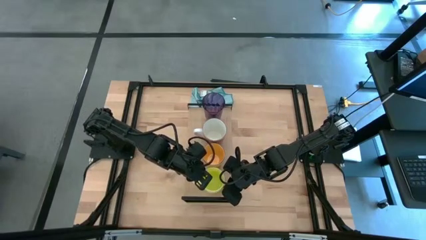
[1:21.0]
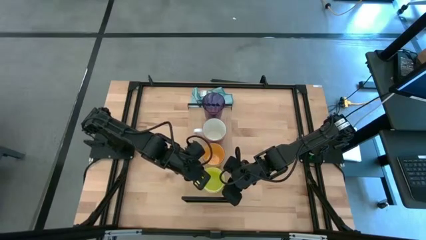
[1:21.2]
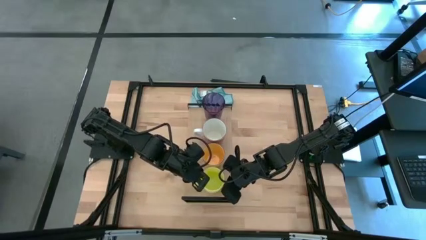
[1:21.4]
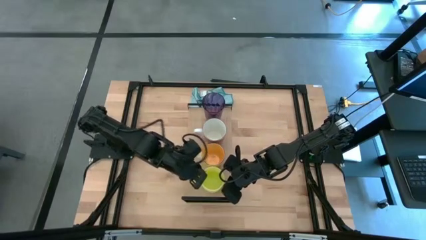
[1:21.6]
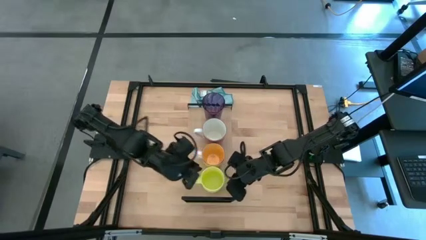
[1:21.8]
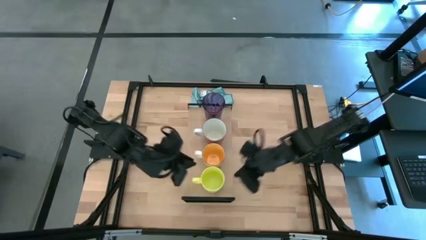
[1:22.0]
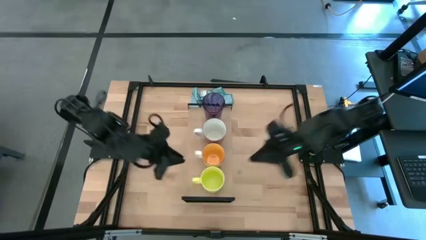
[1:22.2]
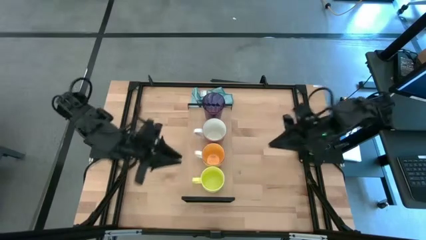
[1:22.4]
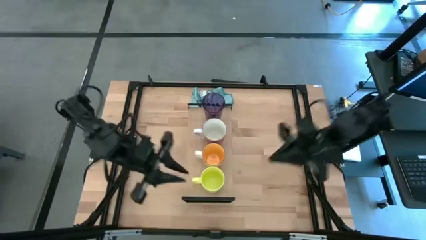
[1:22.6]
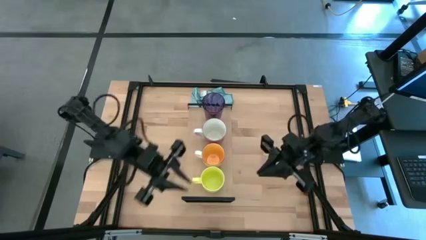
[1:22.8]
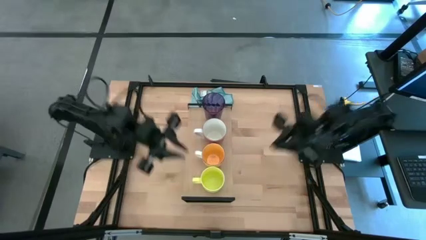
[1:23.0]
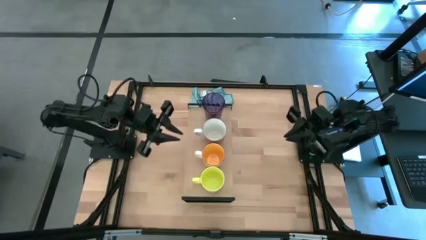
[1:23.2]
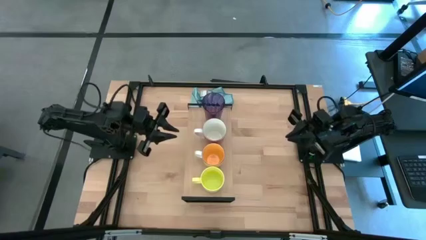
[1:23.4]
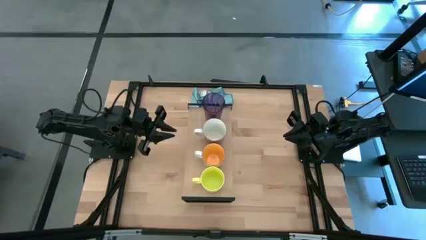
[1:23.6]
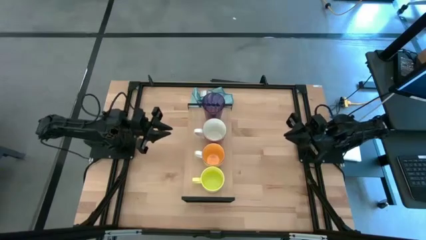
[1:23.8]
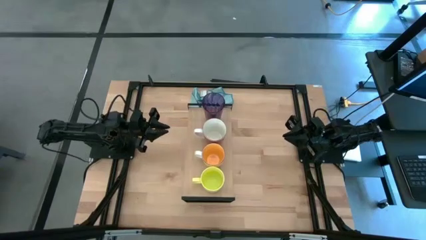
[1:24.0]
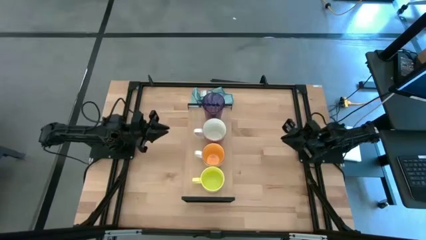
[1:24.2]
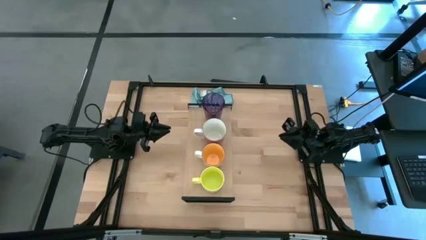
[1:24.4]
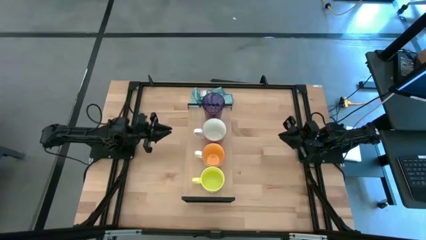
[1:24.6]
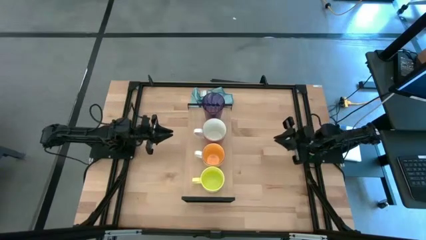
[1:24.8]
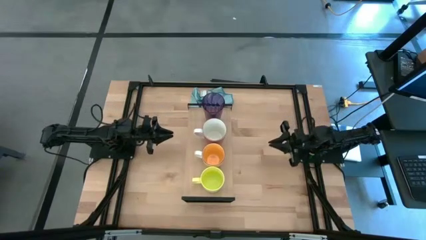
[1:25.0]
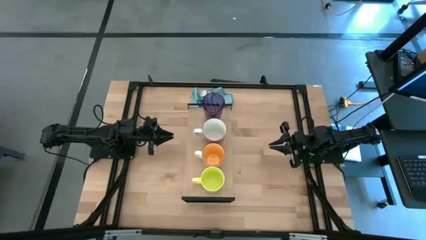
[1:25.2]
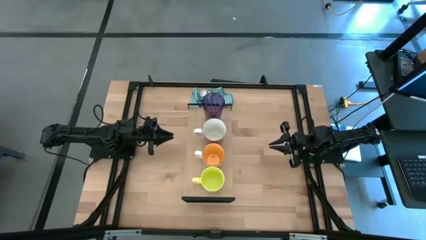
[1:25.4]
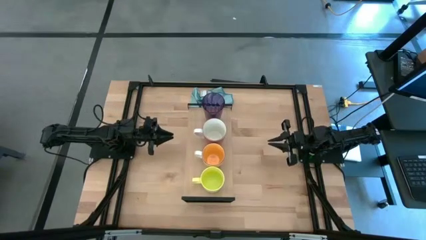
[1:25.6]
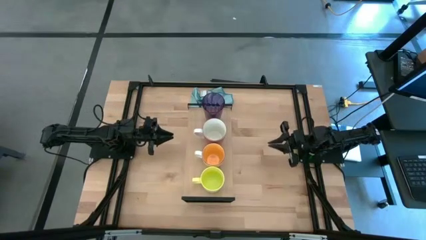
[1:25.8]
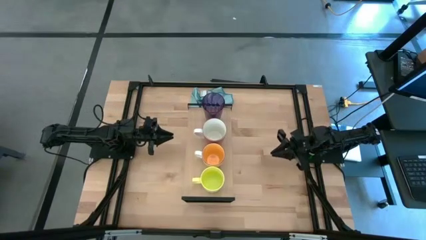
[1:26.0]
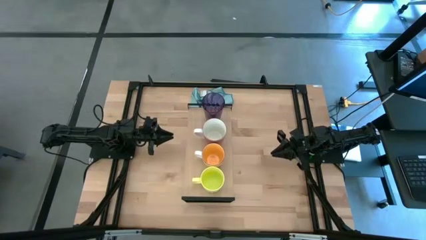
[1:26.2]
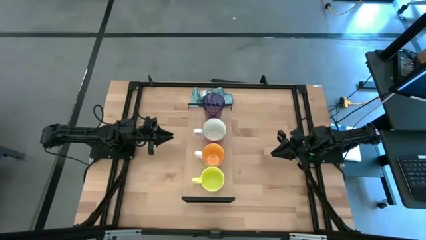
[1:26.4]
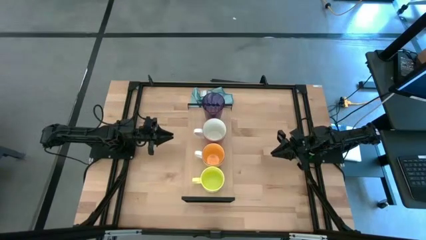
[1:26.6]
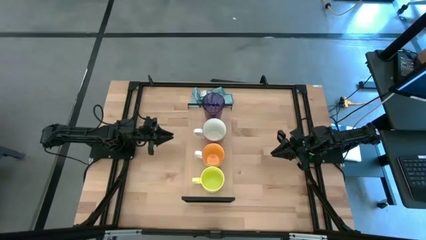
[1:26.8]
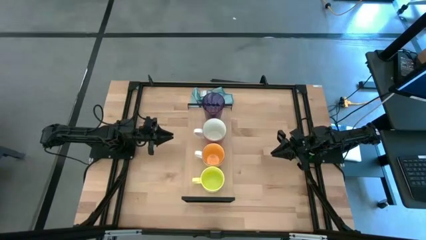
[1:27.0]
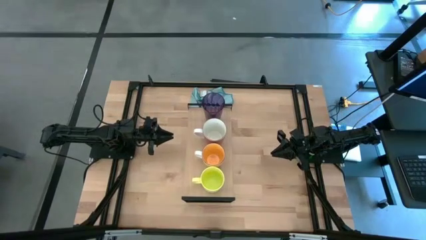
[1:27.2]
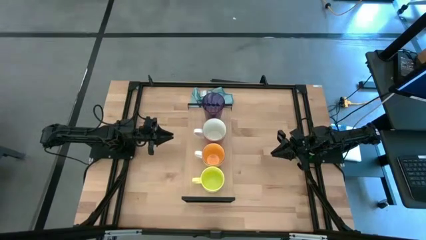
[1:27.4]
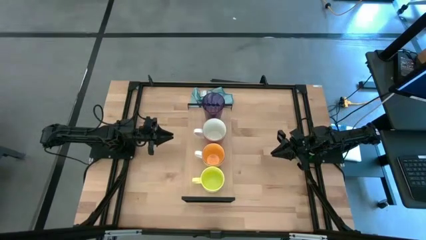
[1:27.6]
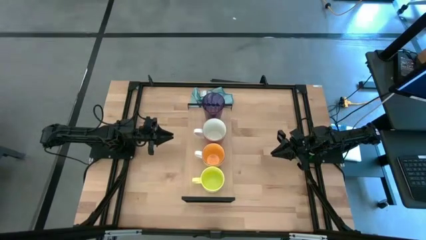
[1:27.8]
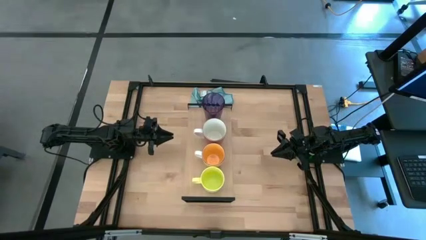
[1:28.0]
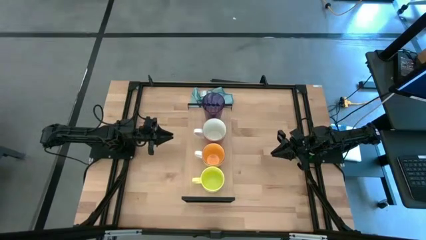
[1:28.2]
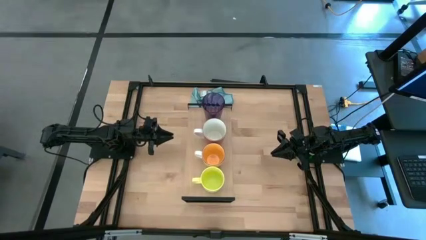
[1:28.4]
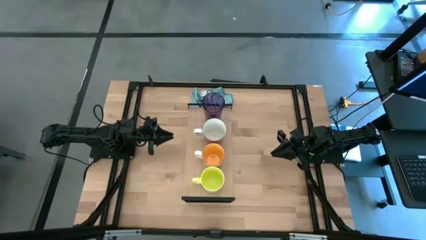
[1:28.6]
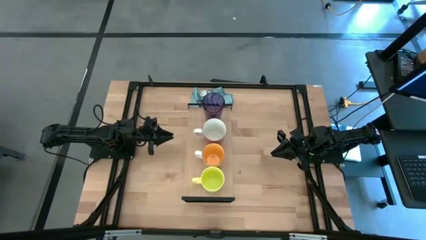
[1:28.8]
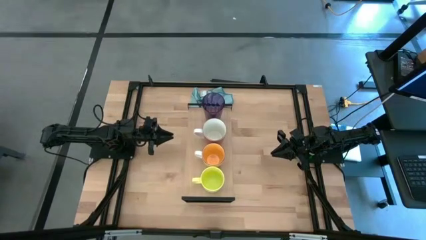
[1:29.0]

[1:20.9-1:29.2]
Task: Stack small to large cups/mugs on shelf
Return to Home Position
